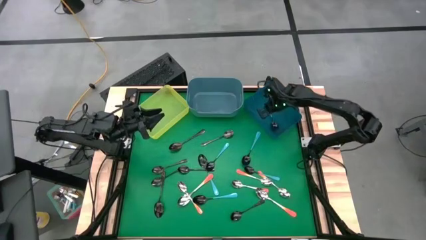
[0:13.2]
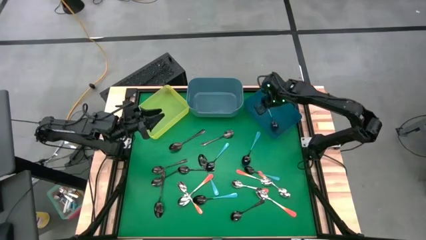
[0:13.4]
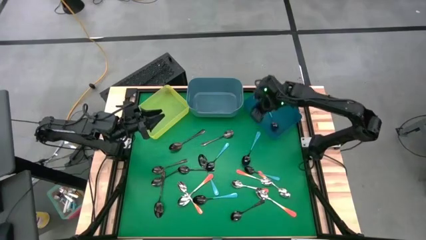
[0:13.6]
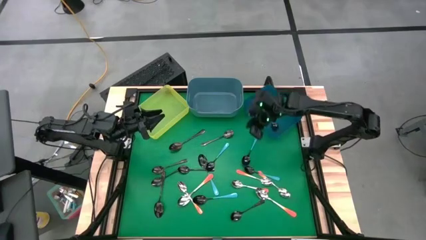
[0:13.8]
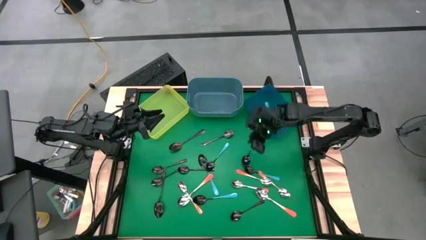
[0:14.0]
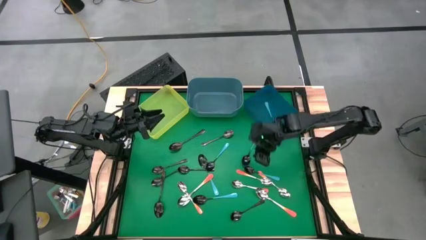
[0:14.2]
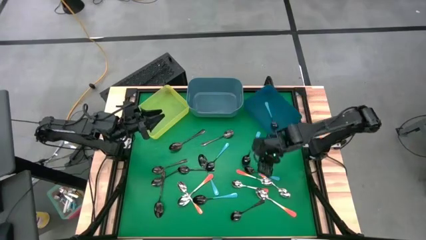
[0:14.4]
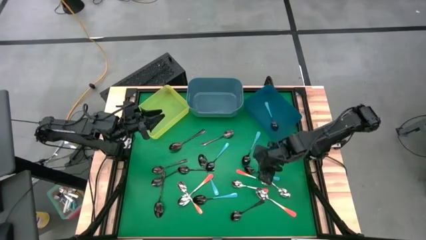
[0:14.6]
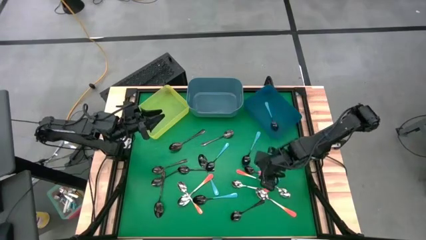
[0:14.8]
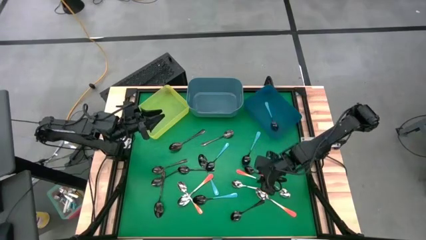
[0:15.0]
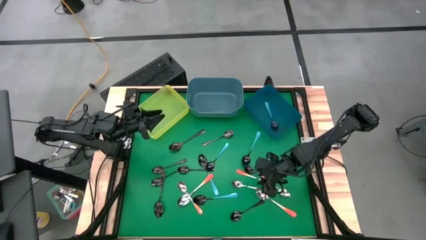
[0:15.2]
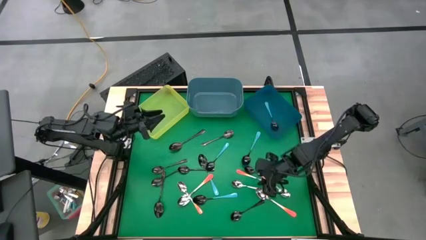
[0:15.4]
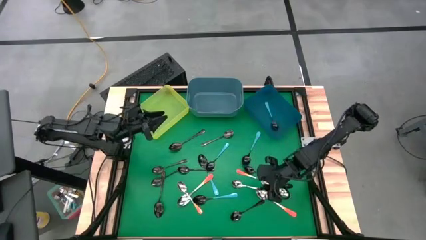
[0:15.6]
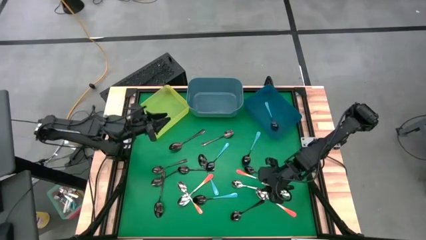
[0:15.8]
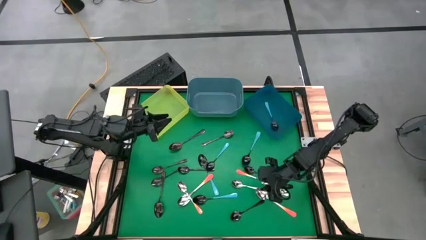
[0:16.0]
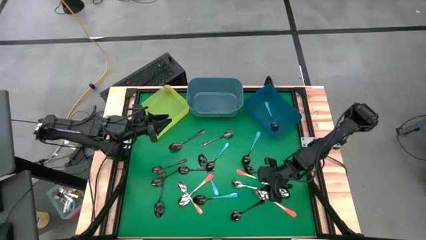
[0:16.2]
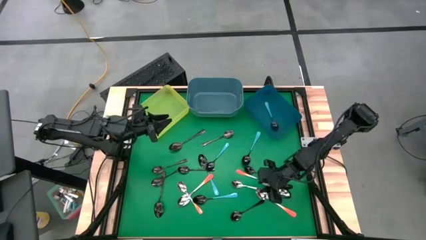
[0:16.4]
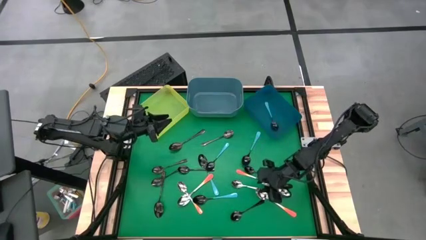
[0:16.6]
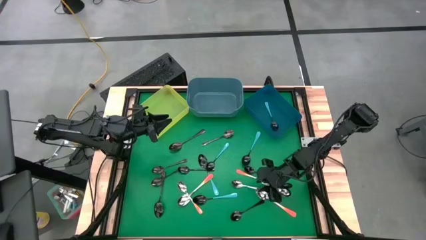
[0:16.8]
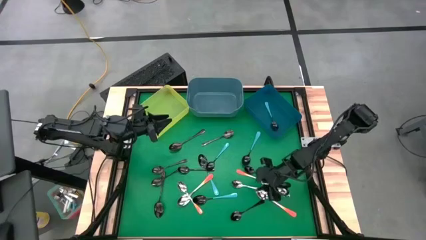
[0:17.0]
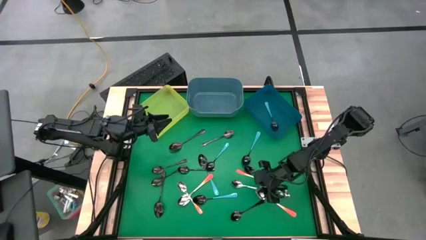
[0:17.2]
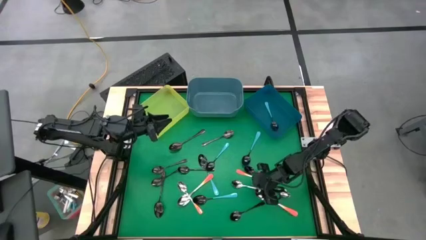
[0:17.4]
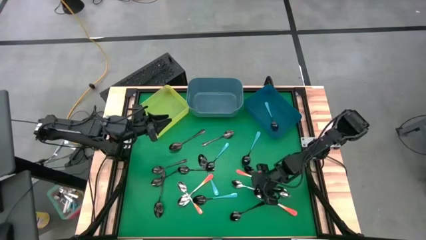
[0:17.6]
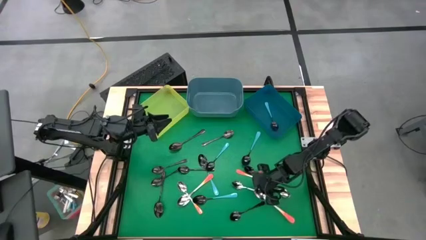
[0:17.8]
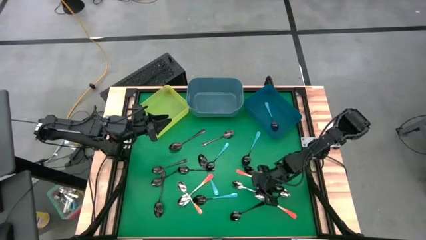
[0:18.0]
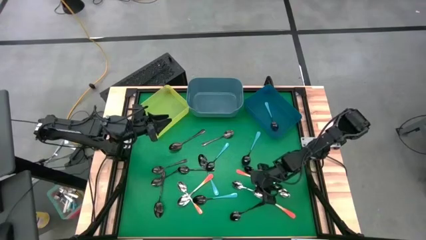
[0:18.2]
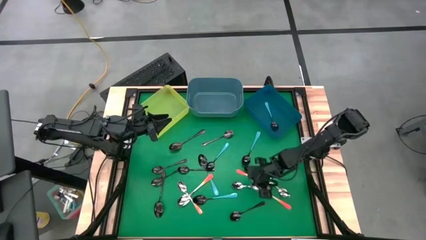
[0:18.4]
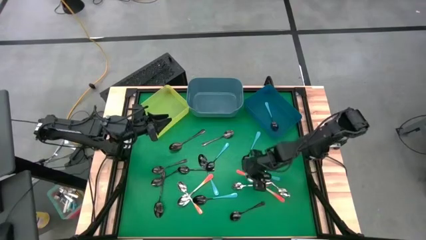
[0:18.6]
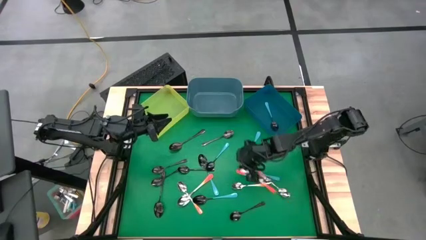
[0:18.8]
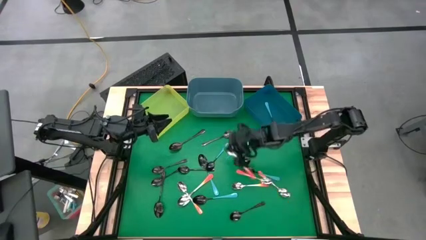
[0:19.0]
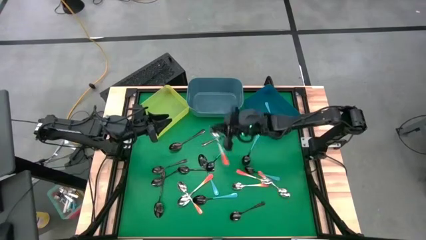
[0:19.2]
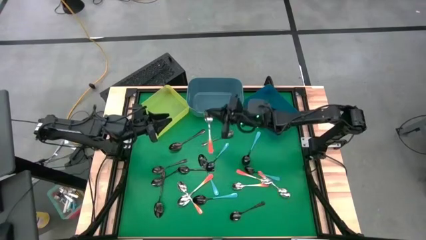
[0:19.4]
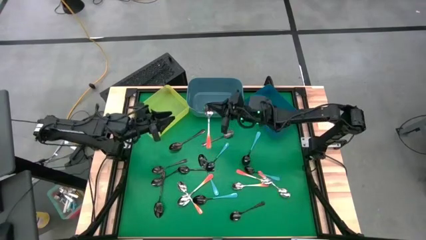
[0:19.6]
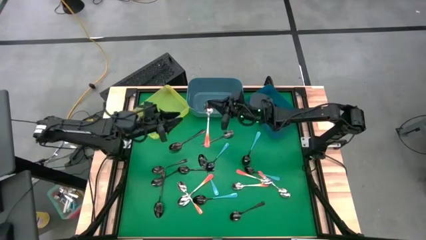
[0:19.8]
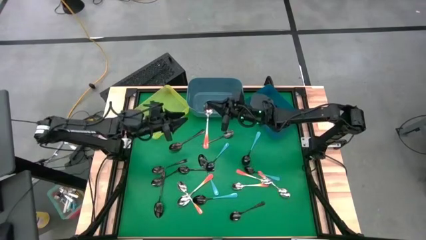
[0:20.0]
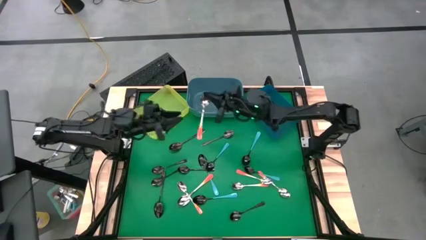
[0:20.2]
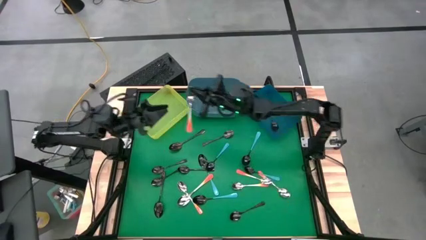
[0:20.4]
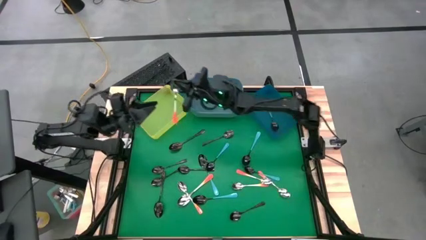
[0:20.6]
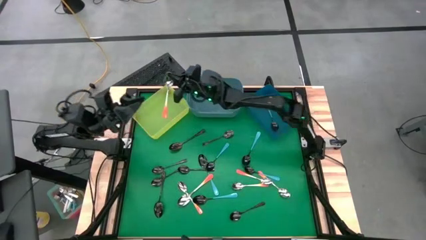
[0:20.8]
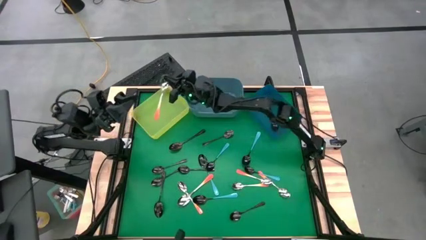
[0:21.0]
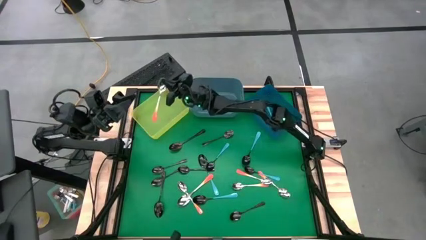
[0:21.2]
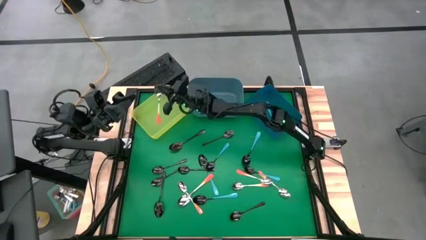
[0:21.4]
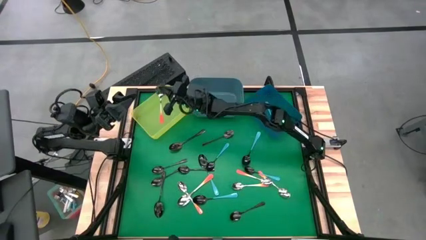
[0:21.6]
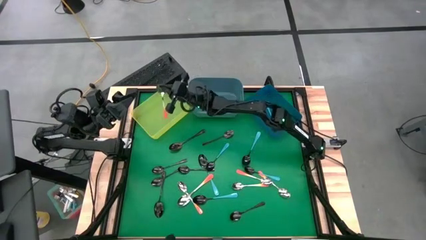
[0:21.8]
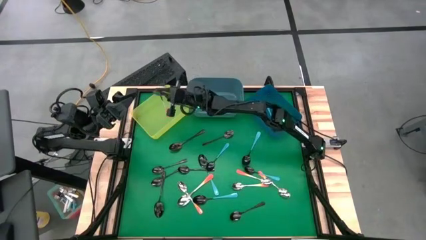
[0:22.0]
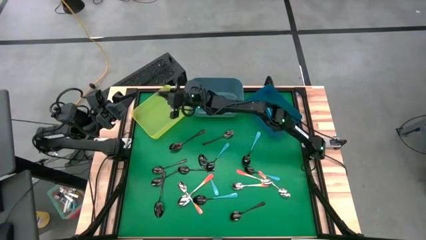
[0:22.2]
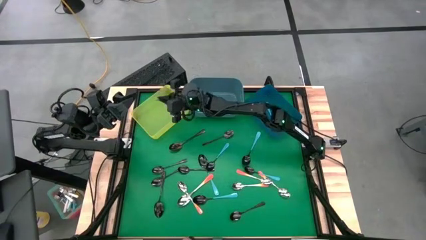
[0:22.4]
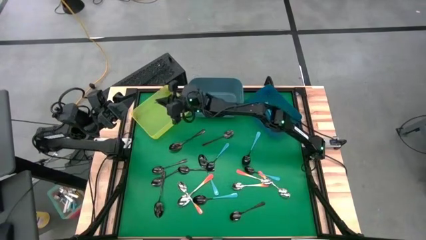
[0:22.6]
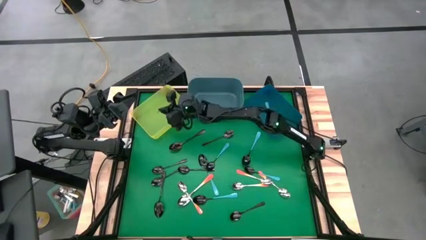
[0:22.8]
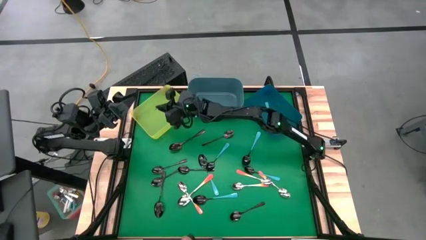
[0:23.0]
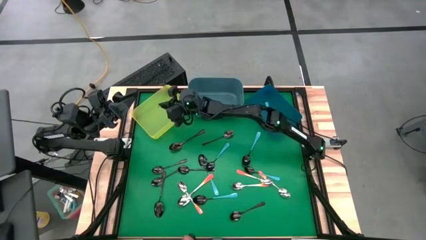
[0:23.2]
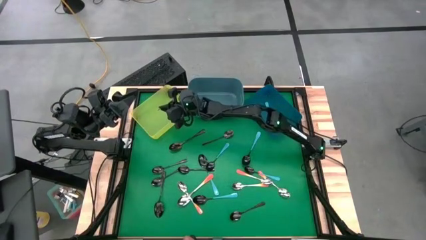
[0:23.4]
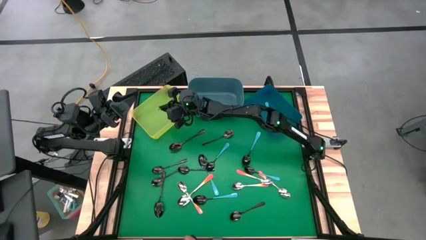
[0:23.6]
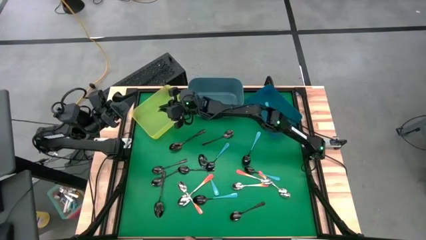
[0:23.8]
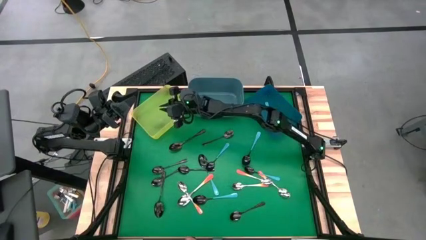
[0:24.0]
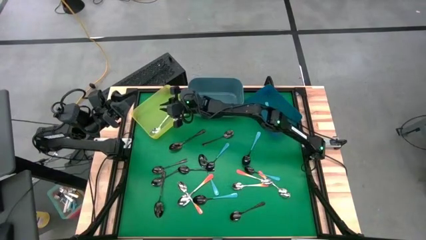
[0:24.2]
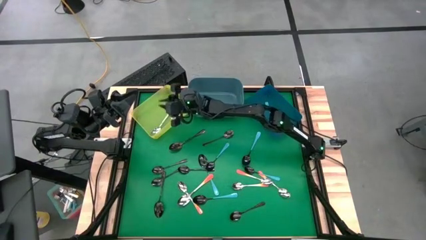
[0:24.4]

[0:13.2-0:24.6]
Task: Sort silverware by color (type)
Put the orange spoon into the yellow bin
